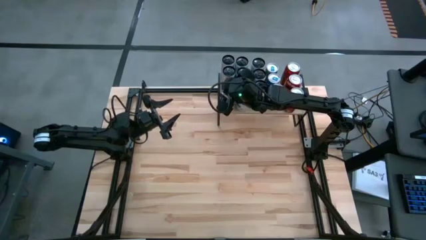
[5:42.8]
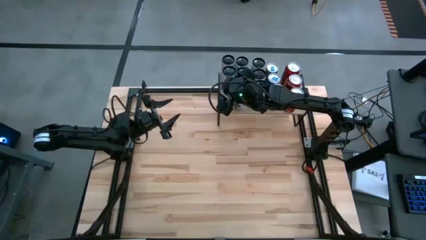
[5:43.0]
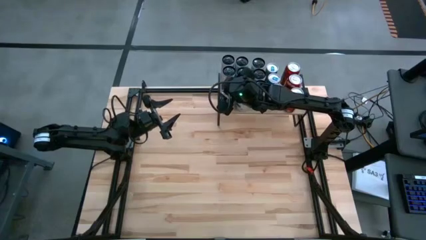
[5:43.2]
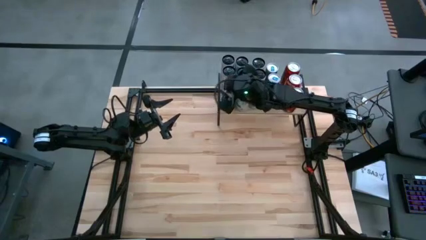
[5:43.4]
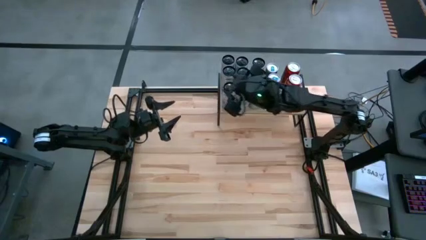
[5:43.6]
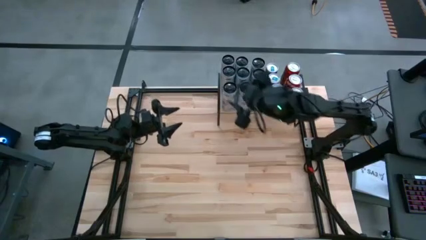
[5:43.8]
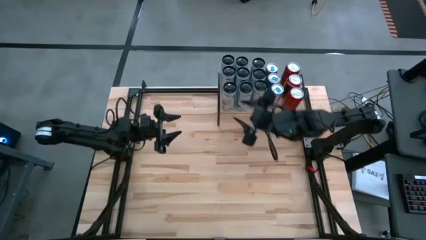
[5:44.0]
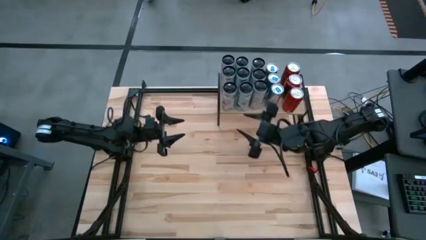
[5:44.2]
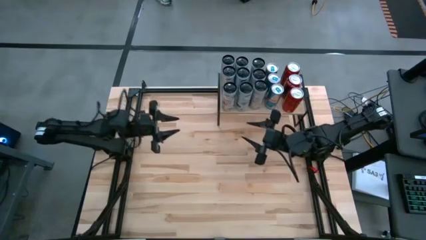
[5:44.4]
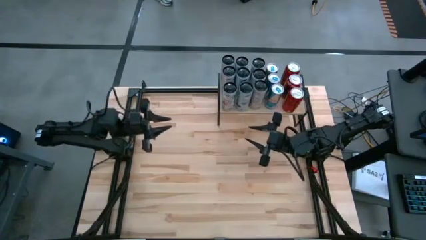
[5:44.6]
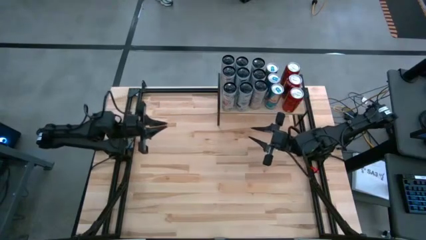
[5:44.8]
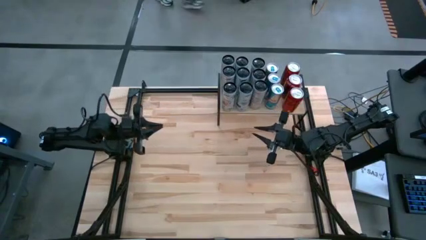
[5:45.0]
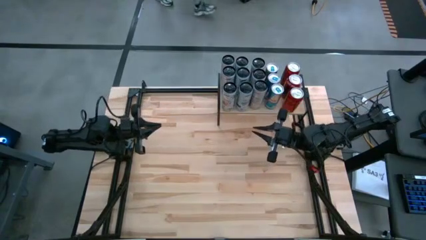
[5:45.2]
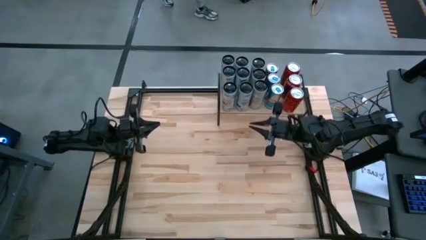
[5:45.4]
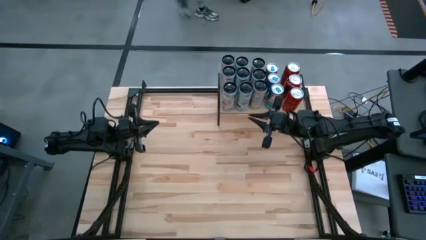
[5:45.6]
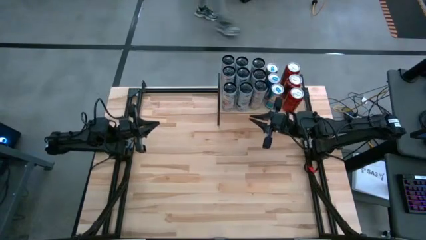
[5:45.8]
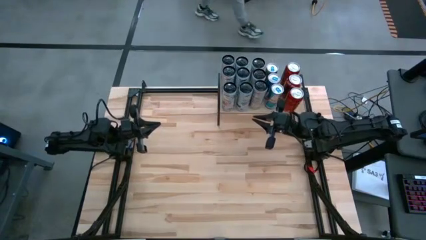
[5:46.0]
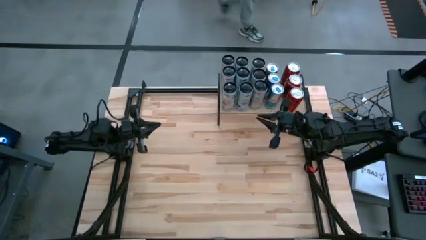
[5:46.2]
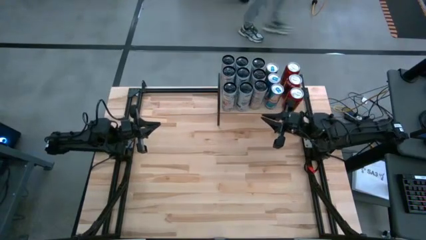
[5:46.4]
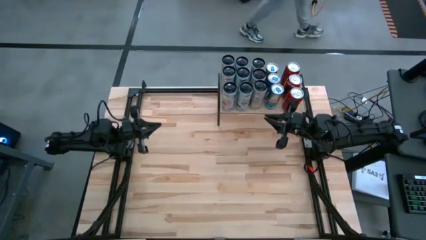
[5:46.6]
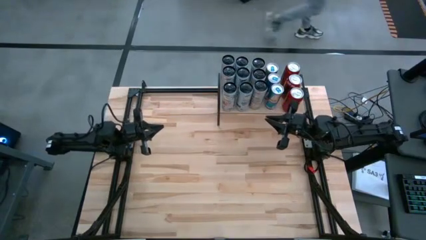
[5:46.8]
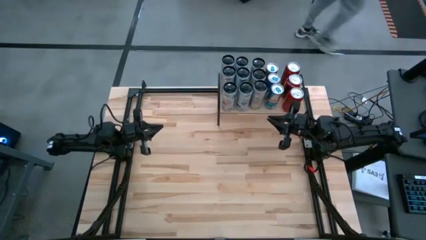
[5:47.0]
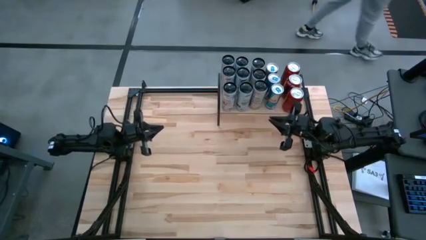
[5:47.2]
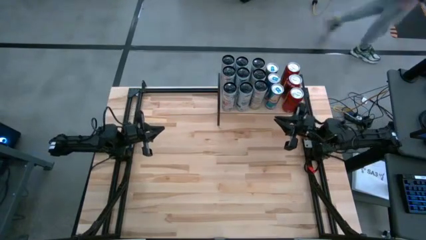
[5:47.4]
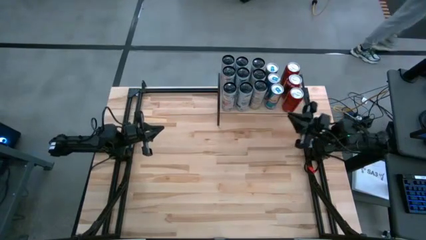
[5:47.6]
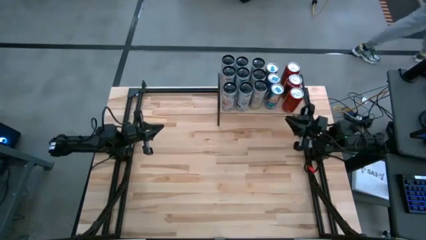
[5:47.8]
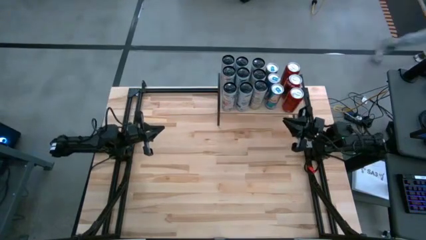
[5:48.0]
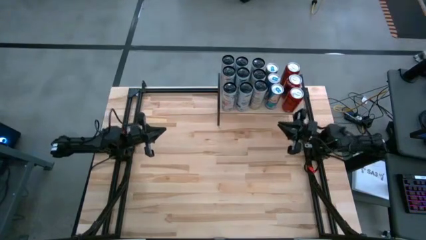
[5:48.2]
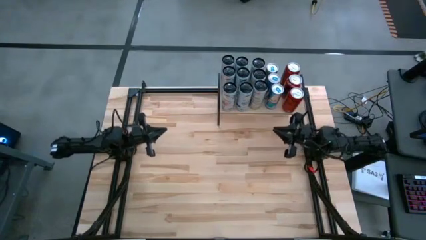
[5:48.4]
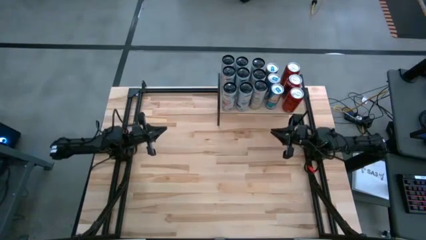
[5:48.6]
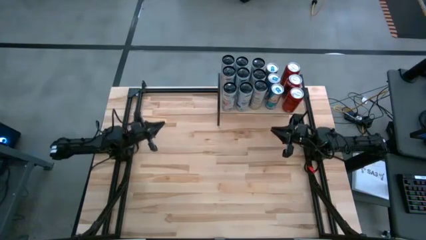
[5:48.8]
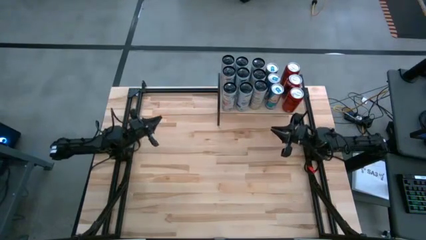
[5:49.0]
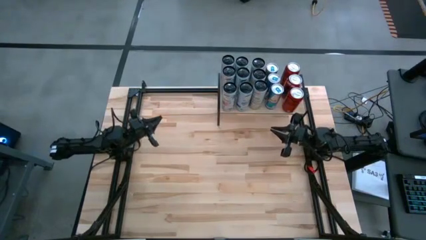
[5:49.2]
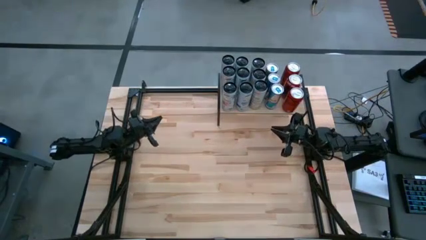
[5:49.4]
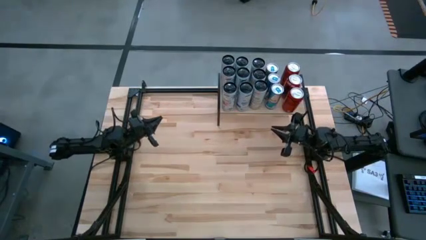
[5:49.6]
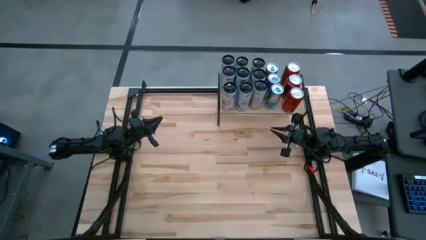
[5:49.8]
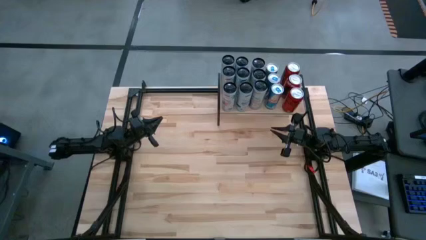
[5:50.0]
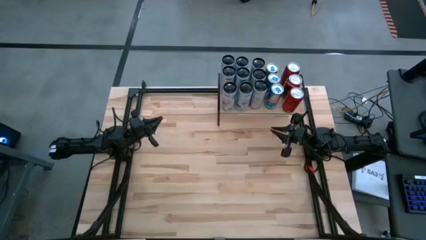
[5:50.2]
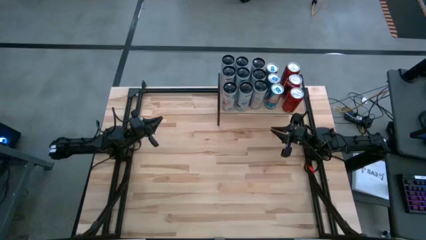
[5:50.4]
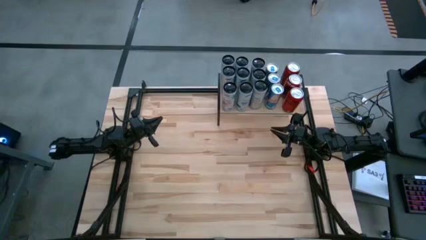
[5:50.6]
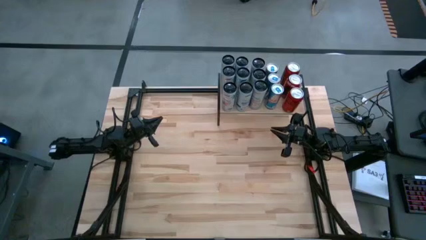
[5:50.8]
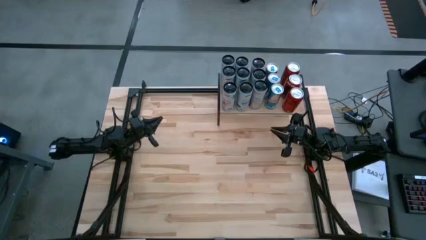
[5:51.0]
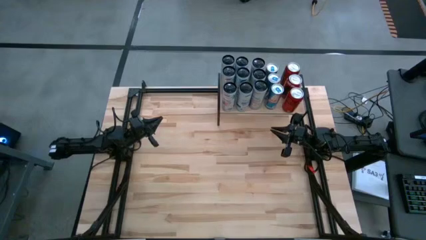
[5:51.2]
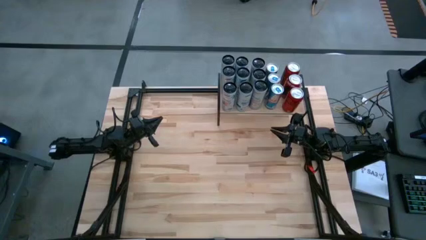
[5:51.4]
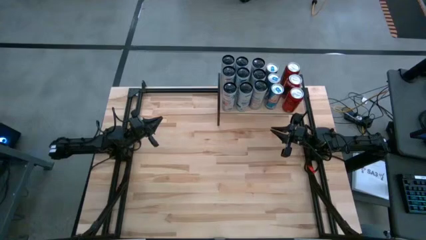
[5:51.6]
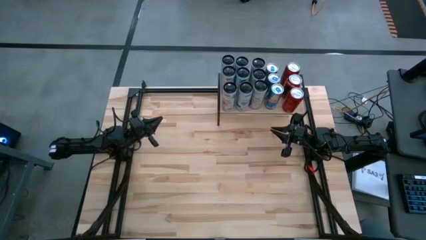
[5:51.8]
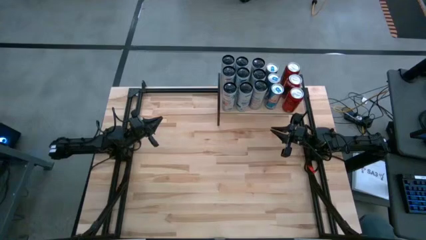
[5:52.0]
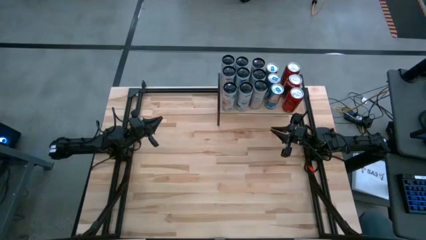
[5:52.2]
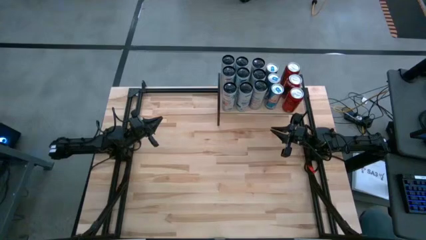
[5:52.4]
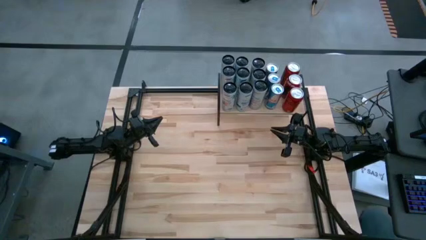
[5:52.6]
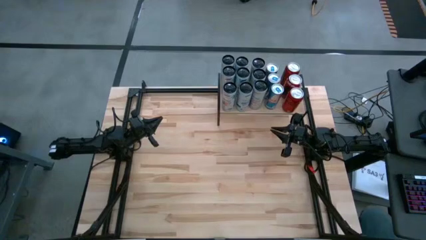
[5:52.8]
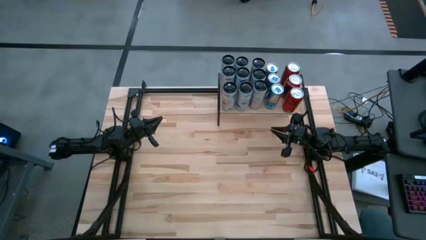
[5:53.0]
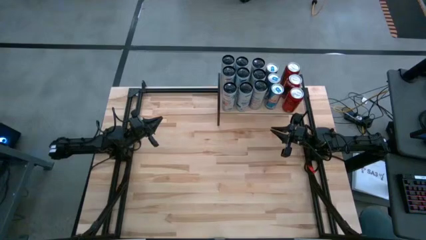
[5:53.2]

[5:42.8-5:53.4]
Task: Place canned beverage on shelf
Return to Home Position

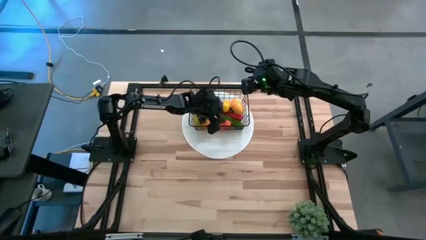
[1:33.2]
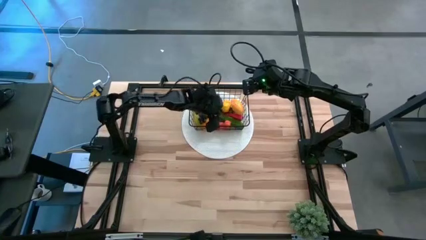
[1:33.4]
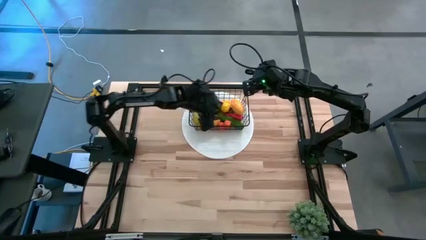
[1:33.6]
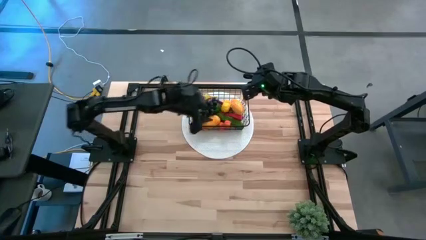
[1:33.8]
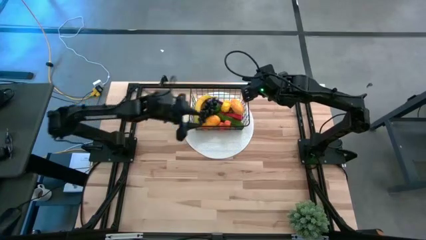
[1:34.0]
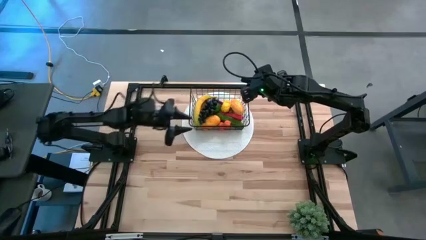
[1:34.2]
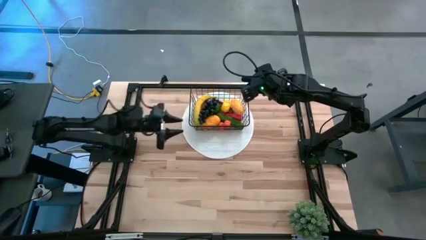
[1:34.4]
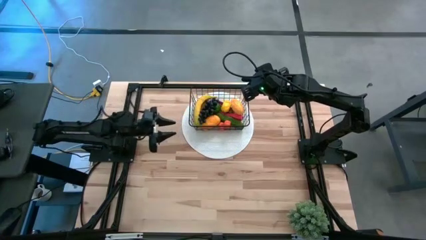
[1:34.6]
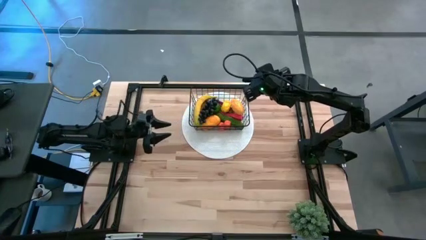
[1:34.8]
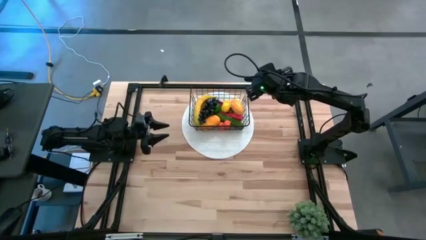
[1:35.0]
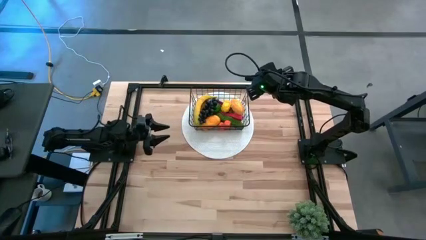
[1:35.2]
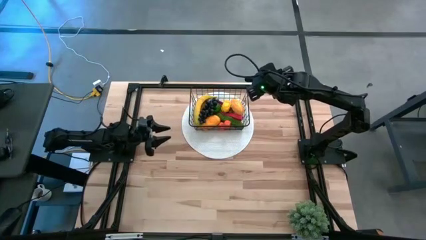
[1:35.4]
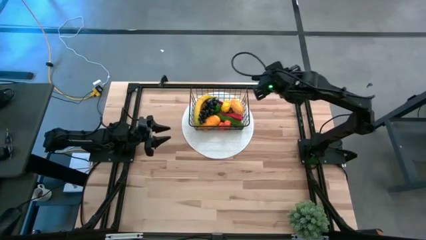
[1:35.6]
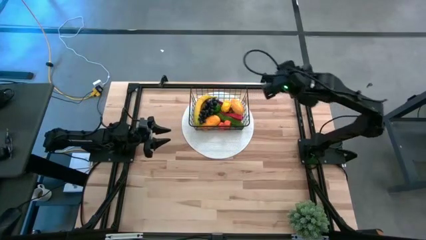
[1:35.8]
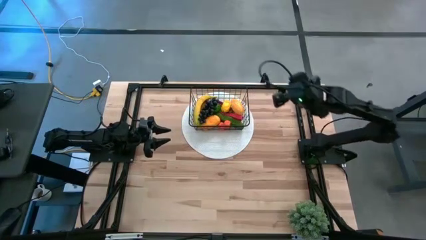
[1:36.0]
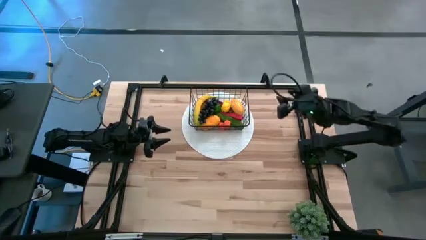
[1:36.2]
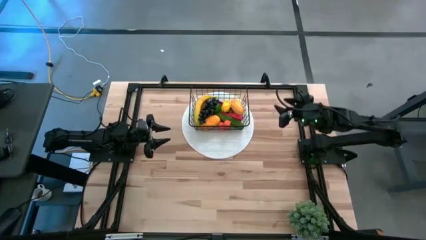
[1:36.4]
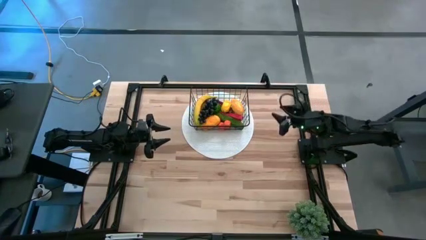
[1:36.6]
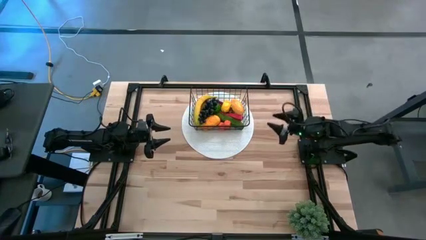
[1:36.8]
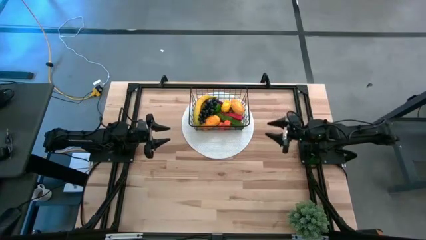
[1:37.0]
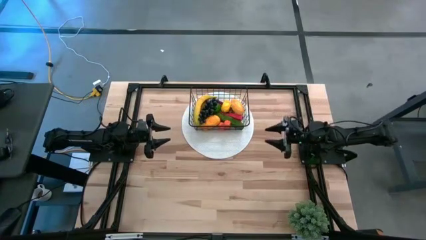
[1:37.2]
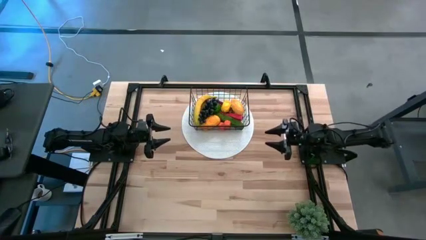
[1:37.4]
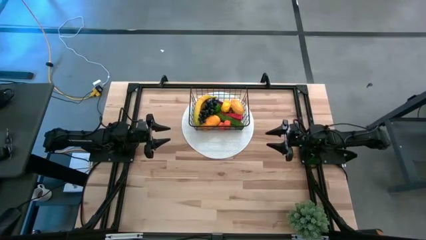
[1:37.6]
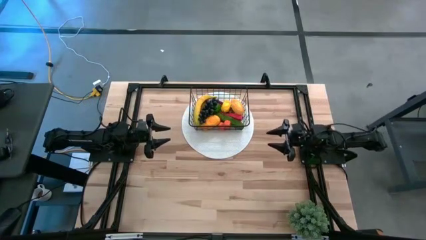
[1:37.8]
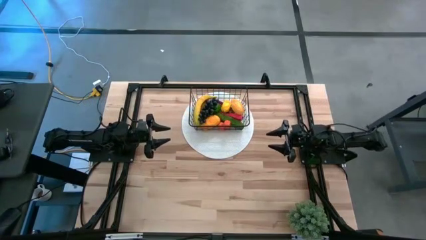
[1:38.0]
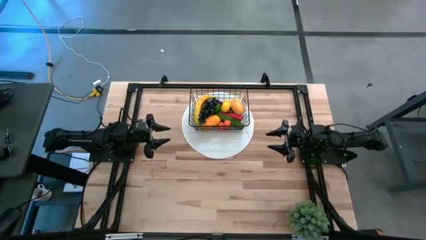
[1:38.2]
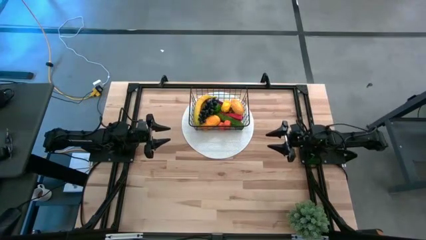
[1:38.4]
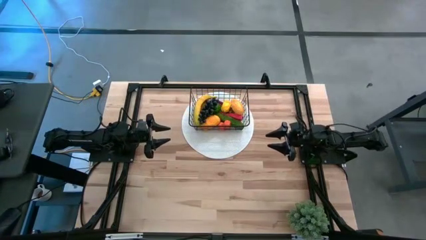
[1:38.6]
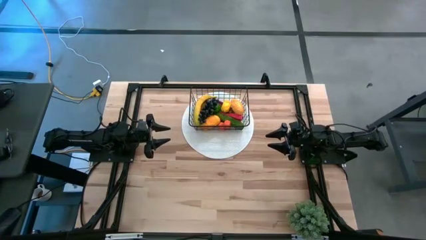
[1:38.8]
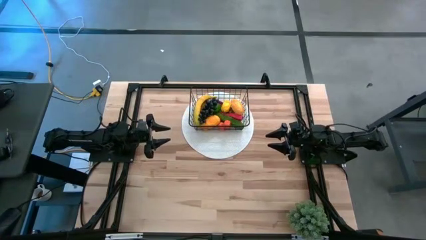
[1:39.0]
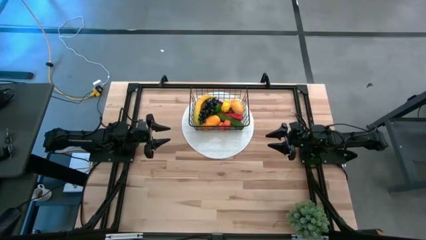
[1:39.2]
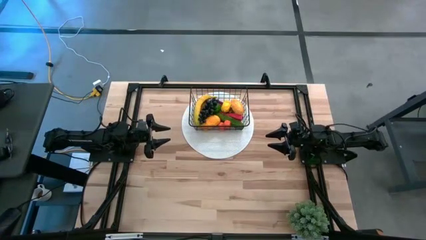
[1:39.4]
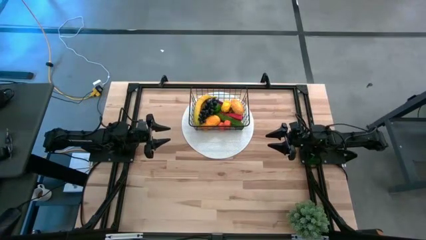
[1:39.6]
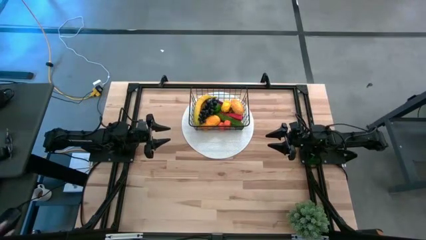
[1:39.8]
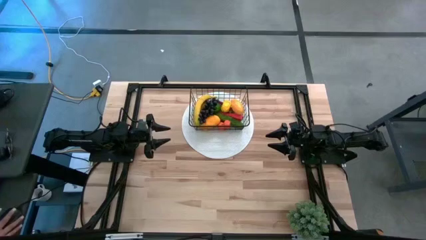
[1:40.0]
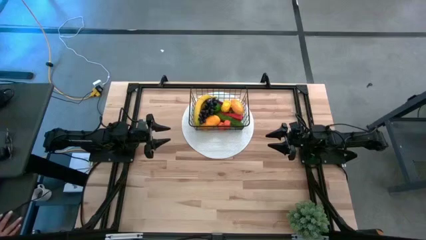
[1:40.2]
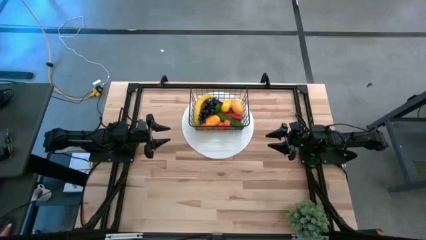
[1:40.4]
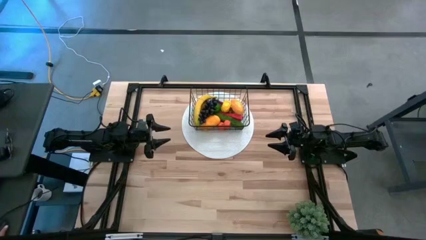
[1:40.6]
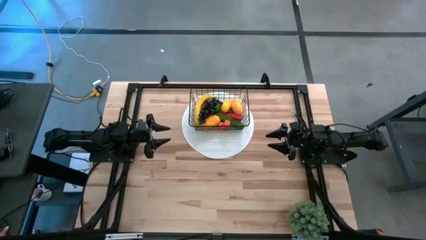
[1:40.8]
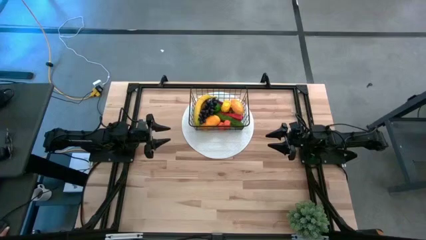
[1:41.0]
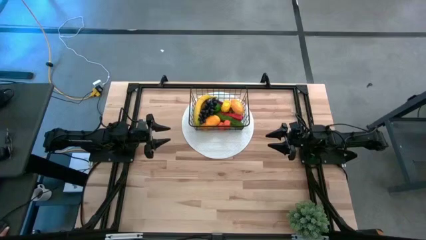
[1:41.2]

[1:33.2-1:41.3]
Task: Build produce basket
Return to Home Position
